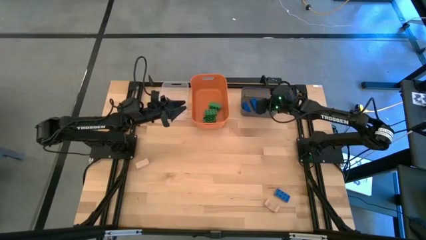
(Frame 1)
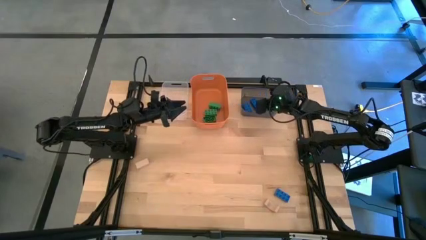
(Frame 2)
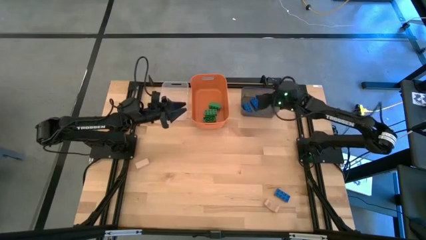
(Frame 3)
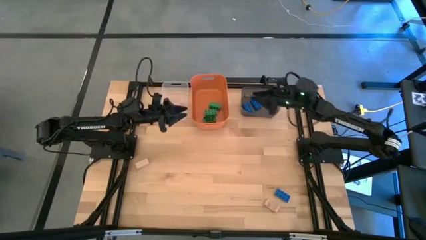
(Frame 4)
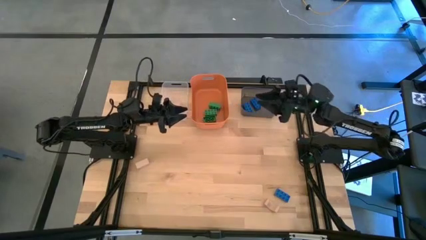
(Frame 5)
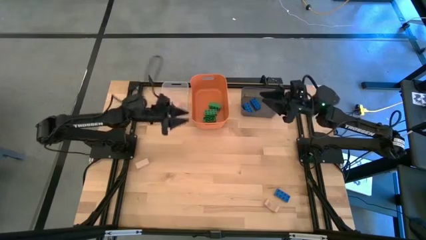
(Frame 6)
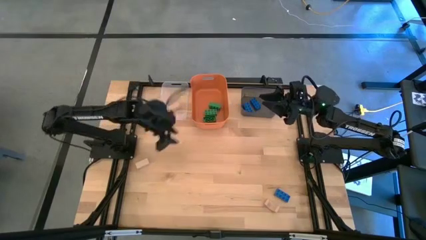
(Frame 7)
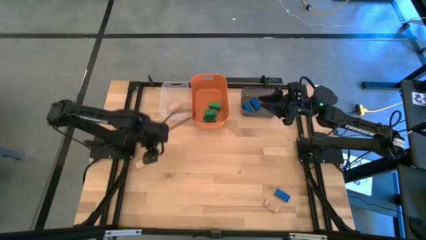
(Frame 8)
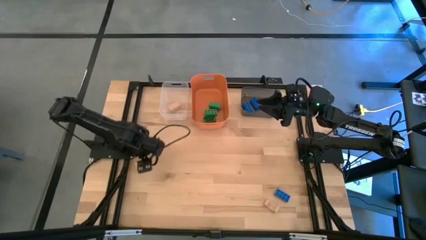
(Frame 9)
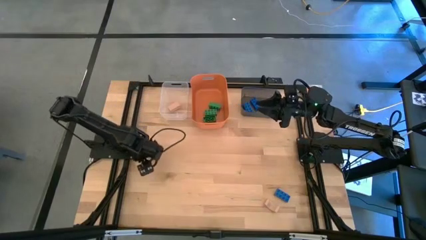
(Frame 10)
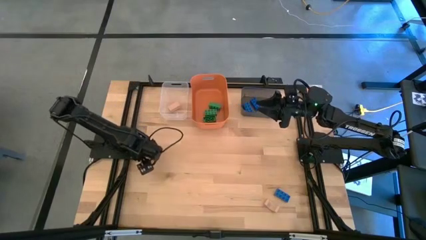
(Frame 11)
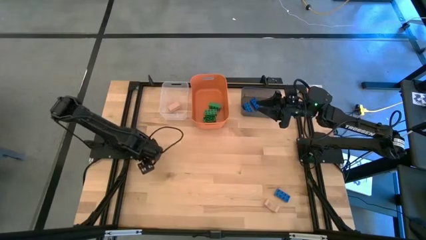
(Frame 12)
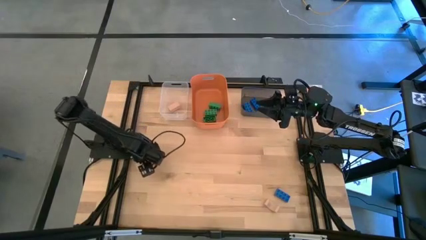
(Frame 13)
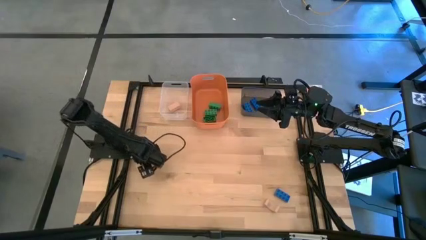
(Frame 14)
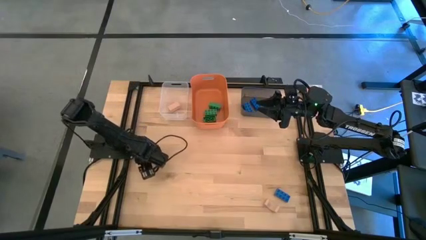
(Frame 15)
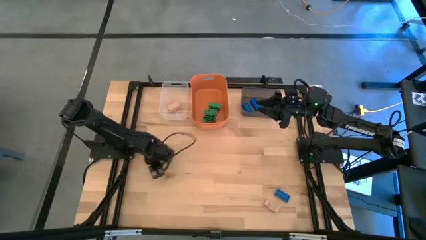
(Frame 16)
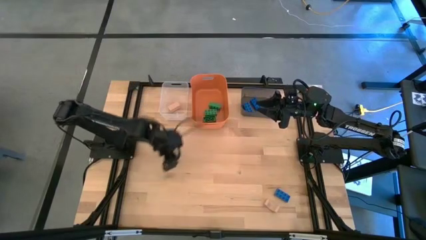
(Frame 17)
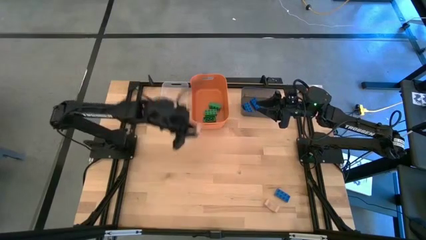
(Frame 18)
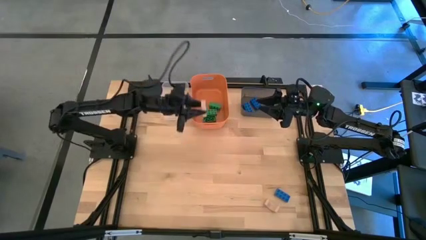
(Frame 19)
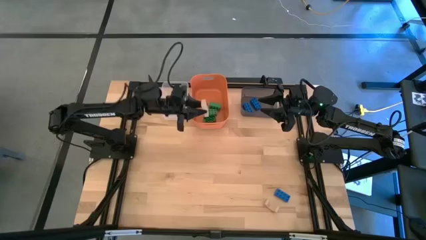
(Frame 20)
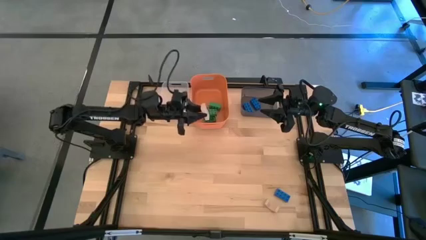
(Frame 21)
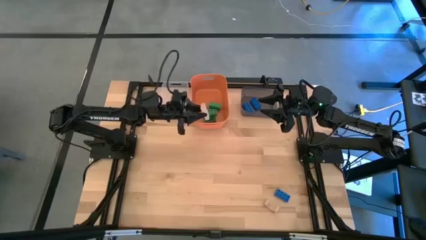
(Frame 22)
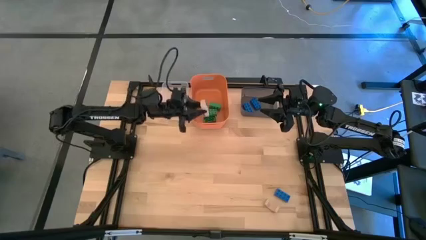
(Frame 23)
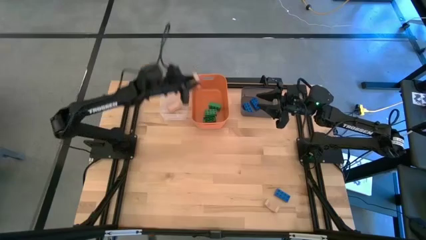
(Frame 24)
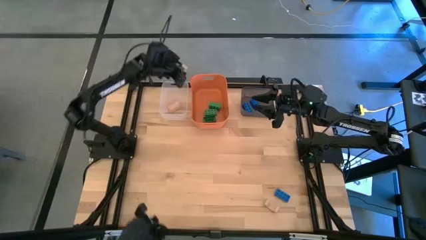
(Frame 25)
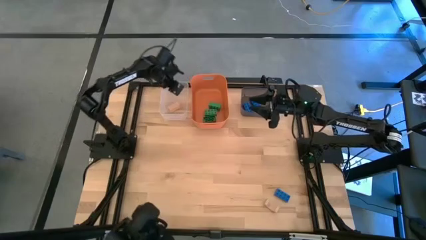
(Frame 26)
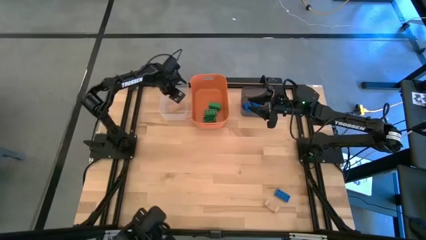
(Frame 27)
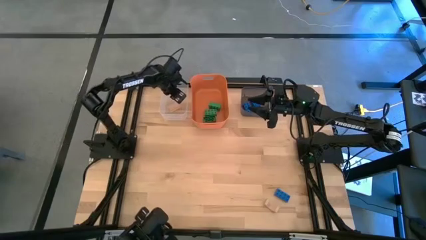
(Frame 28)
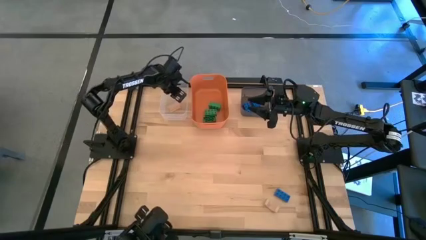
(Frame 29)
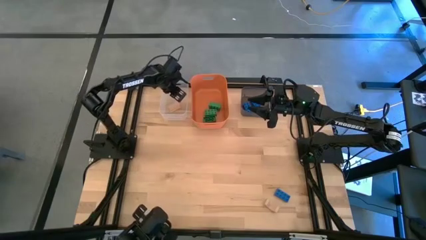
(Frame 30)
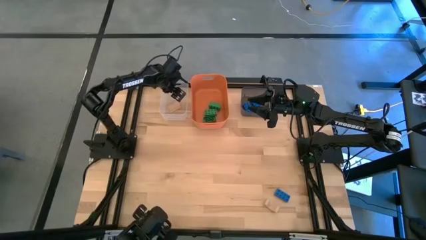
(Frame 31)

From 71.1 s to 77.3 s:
Task: Sort & place blocks by color
Put the left brown block into the transparent bin

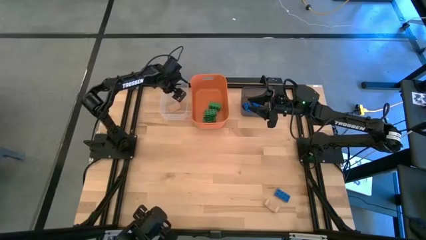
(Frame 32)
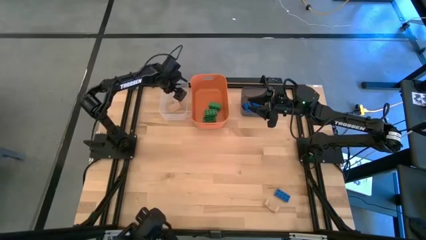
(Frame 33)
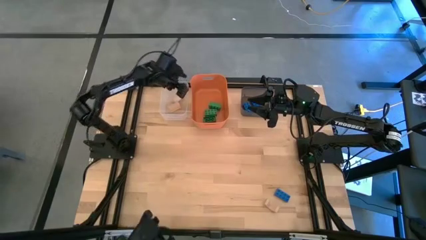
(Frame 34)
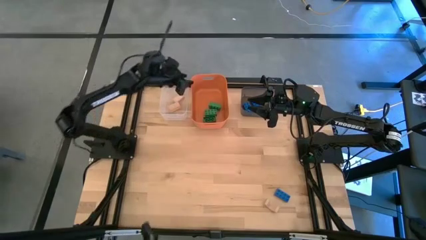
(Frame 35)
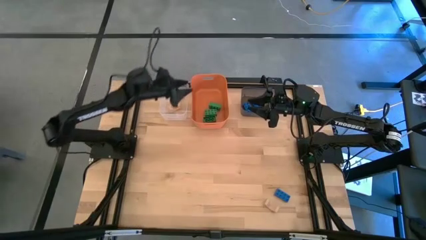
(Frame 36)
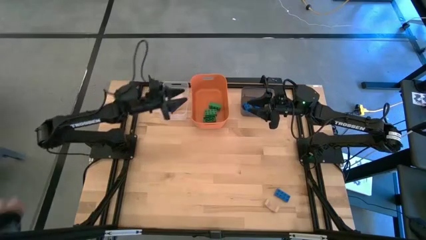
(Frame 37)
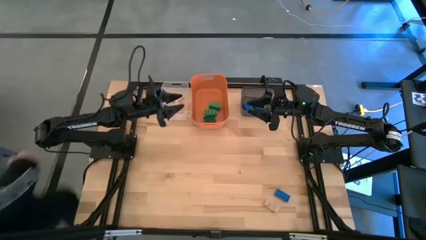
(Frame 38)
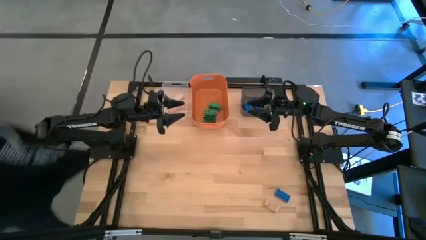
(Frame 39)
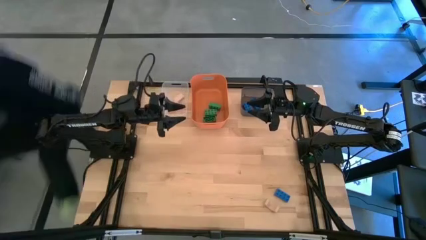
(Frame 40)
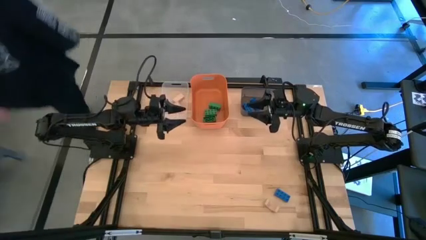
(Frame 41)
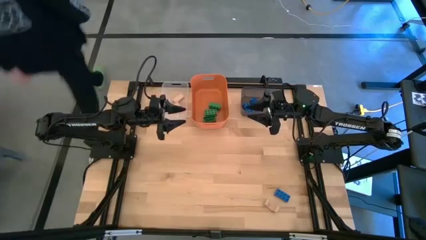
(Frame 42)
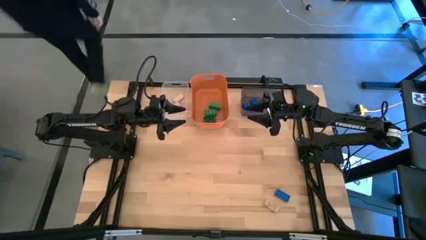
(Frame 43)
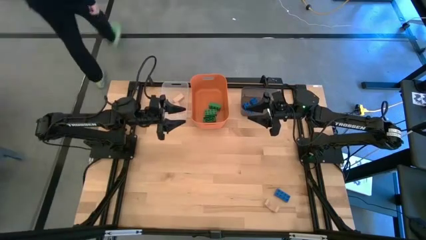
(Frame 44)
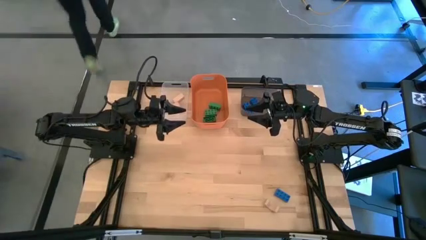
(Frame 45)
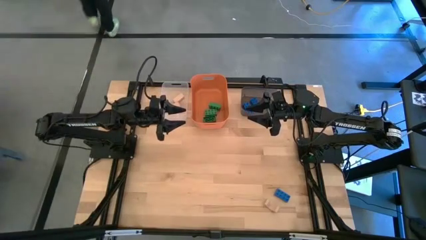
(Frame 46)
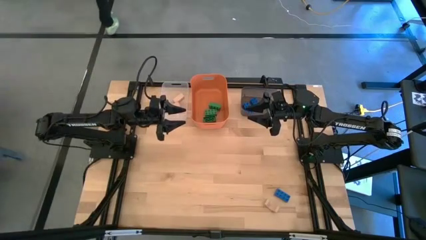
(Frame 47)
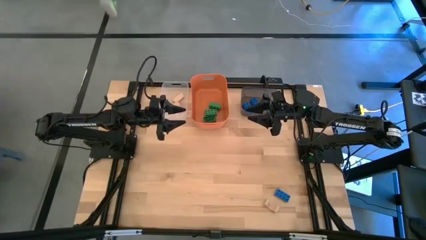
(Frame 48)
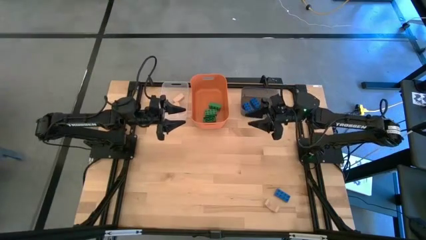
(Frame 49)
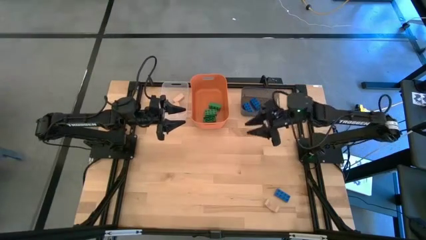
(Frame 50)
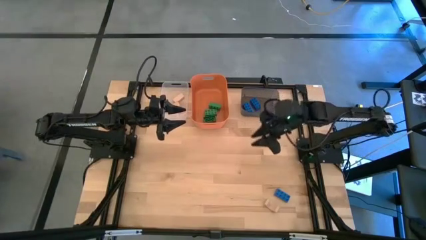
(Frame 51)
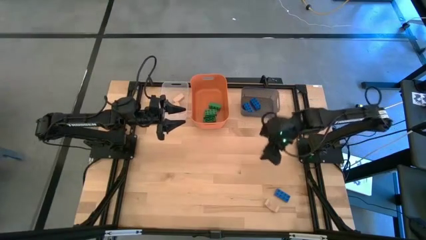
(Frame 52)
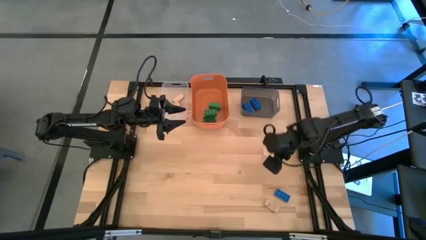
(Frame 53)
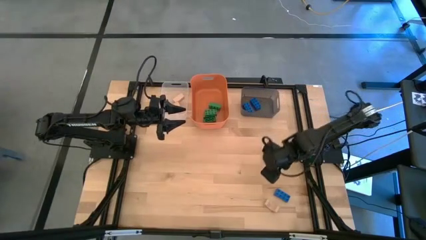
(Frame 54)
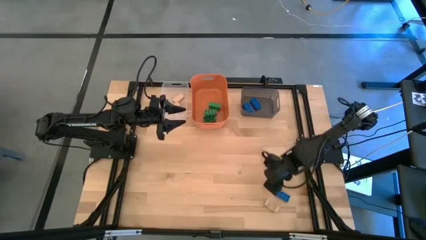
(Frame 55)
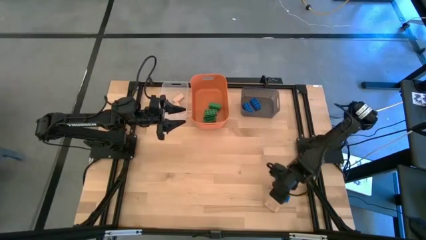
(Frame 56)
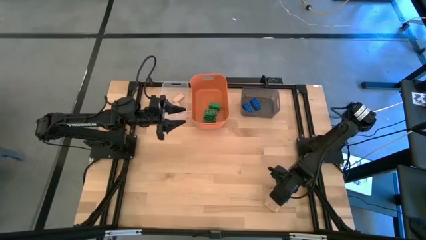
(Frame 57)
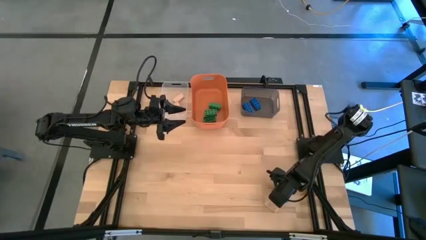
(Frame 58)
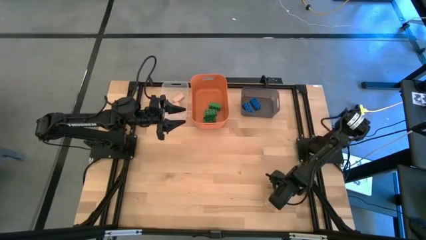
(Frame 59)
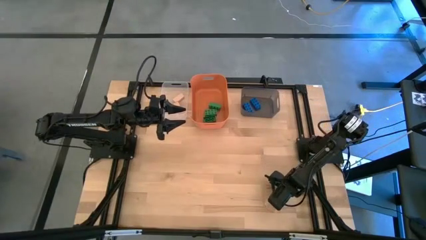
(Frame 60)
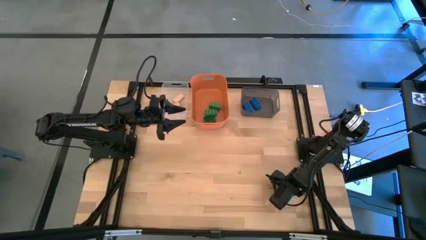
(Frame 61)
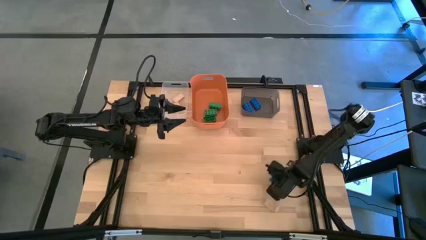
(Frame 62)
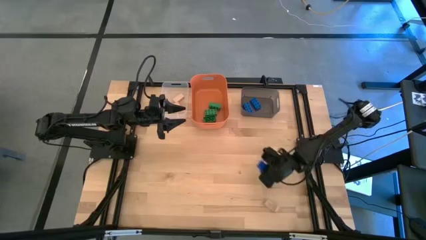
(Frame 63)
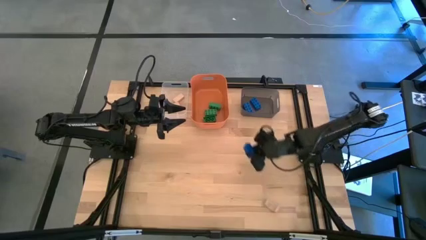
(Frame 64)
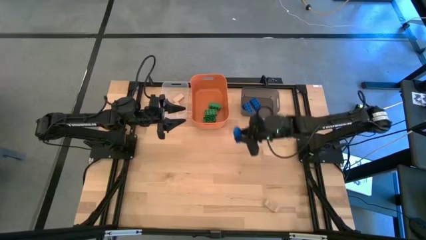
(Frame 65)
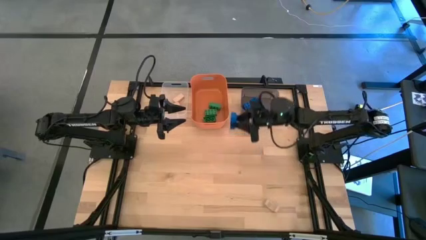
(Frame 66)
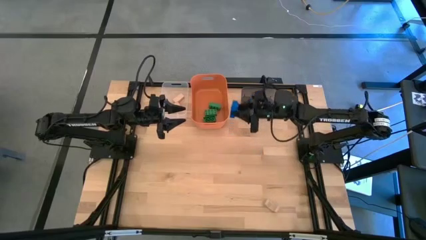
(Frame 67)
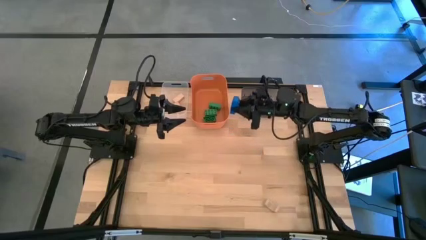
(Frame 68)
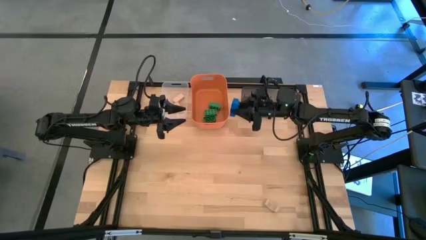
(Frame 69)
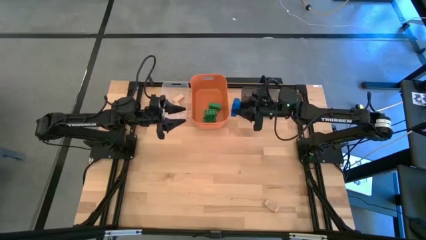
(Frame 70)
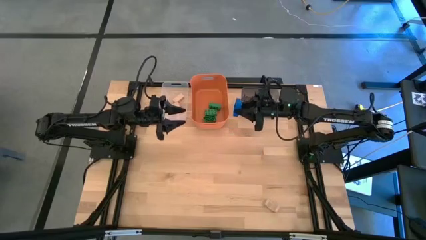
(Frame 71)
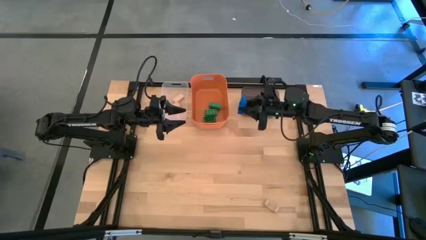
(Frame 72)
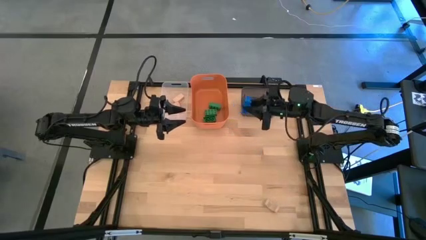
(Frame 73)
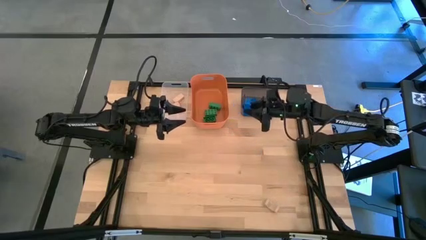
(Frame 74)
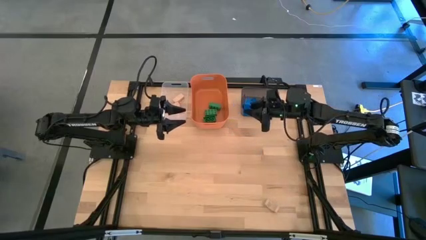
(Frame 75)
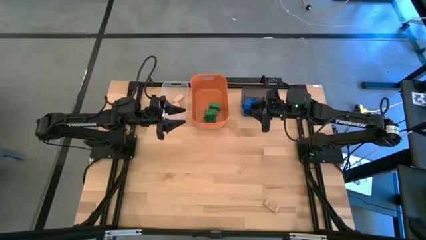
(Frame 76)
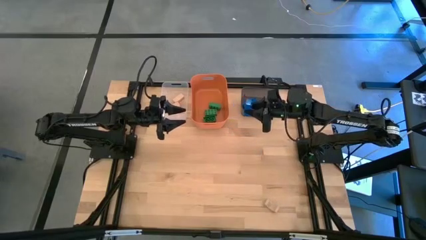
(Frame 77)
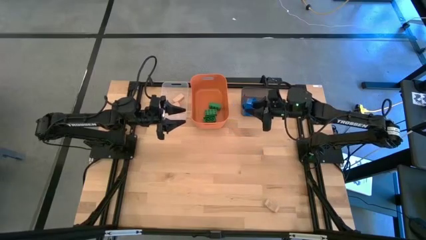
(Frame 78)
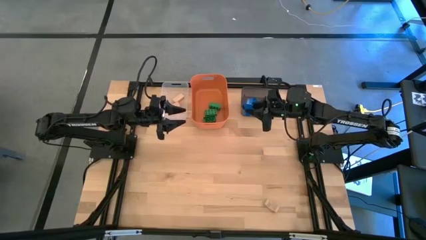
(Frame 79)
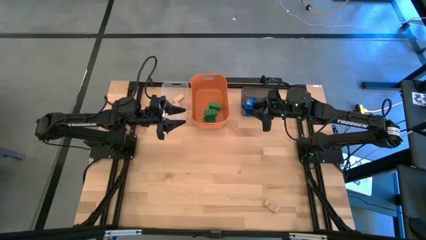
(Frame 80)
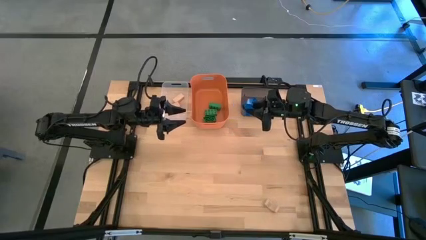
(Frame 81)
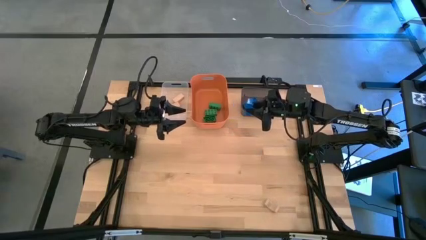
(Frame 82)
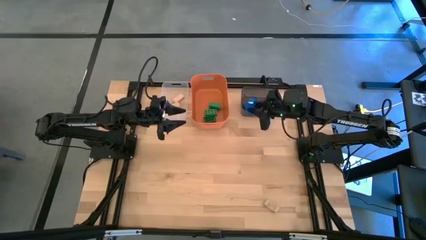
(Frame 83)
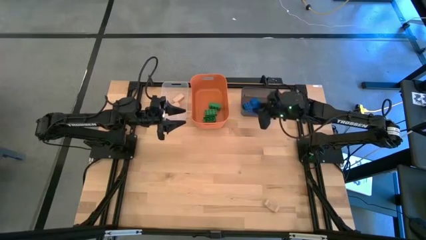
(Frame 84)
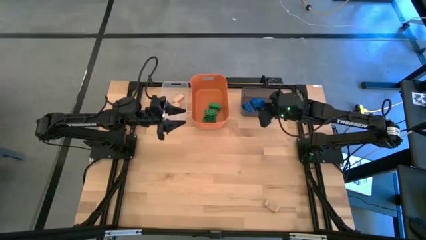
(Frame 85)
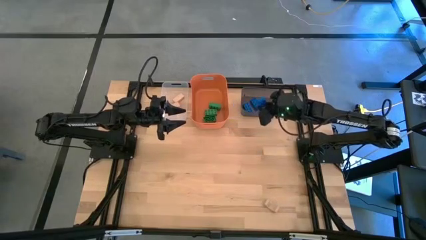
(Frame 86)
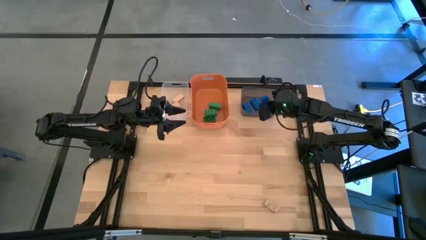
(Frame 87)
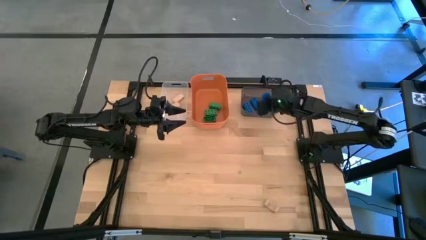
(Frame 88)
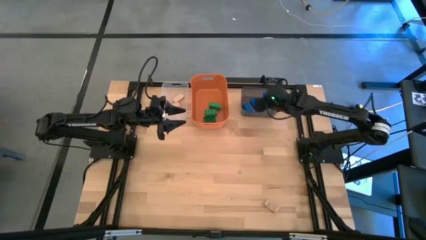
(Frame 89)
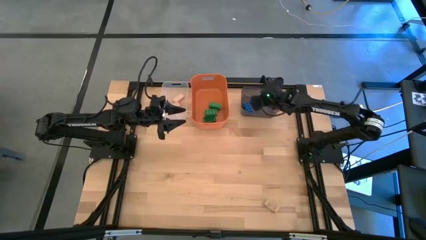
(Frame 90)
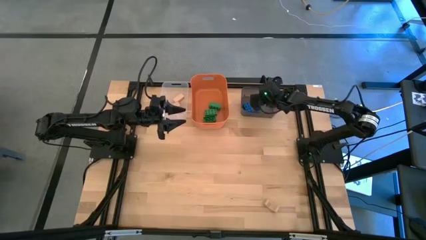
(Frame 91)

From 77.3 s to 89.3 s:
Put the blue game piece into the black bin
